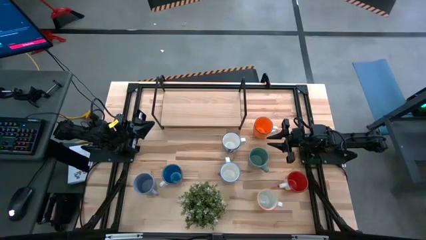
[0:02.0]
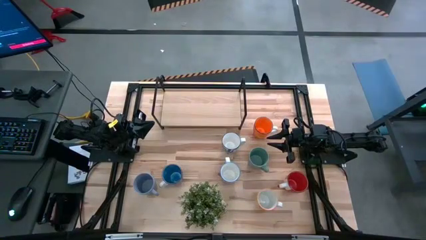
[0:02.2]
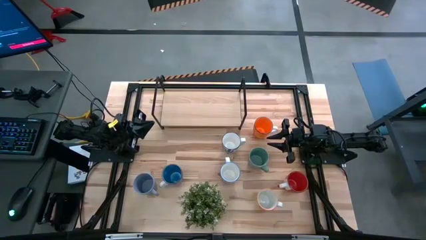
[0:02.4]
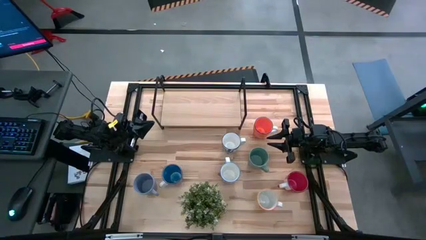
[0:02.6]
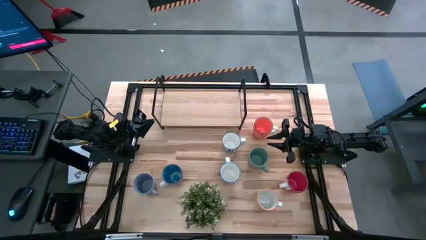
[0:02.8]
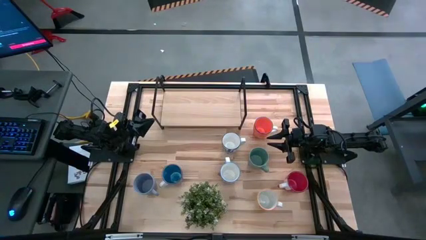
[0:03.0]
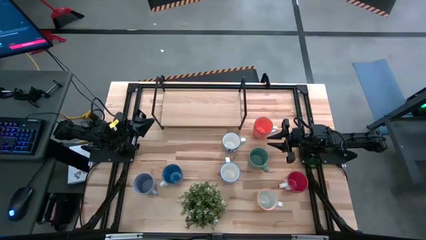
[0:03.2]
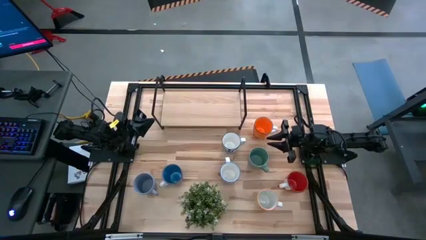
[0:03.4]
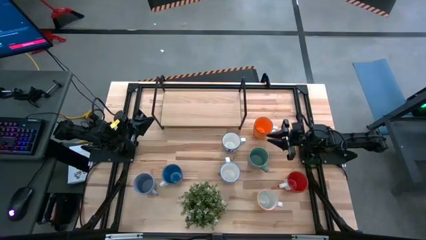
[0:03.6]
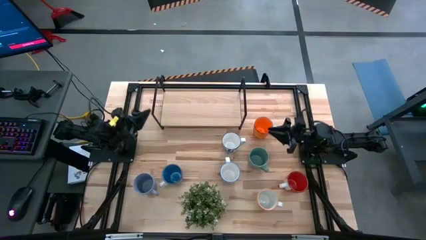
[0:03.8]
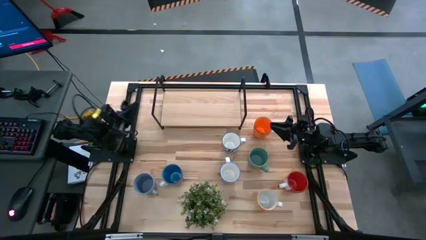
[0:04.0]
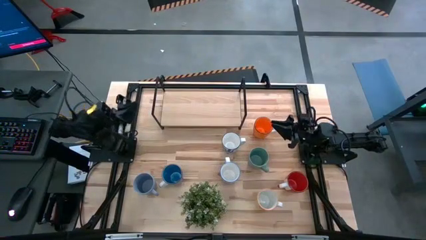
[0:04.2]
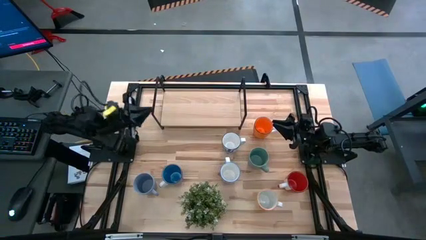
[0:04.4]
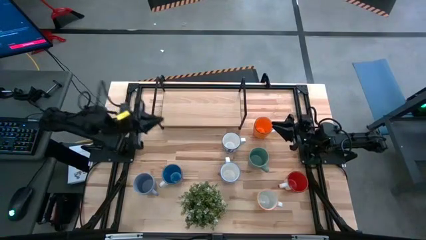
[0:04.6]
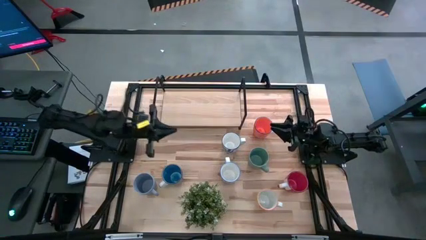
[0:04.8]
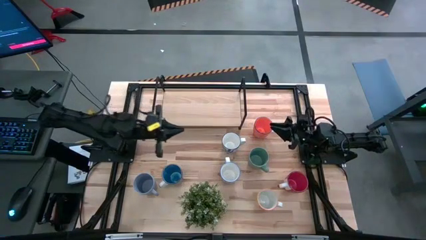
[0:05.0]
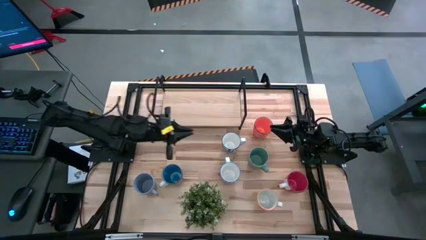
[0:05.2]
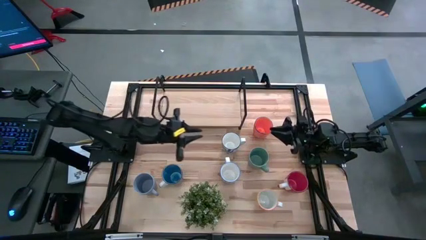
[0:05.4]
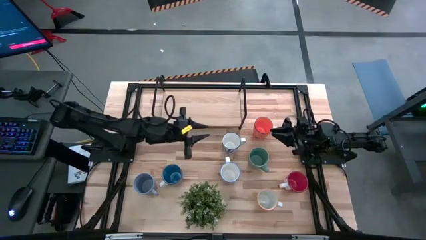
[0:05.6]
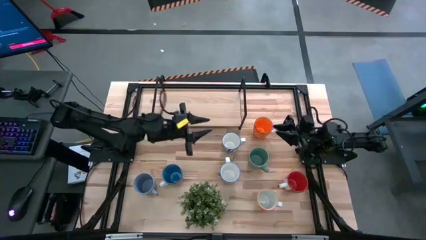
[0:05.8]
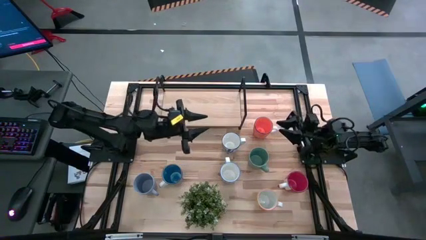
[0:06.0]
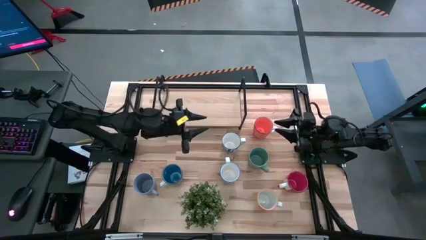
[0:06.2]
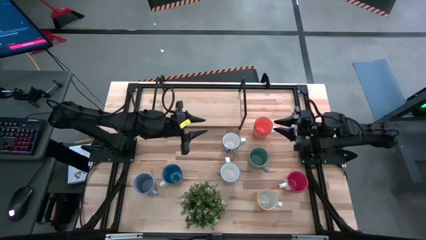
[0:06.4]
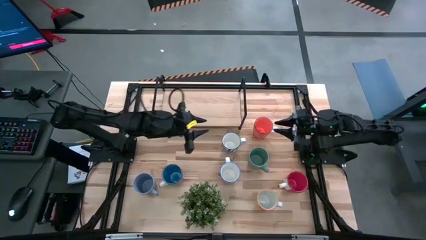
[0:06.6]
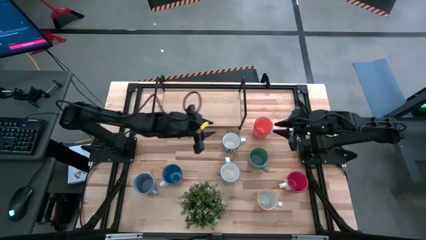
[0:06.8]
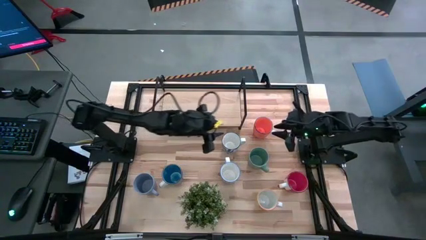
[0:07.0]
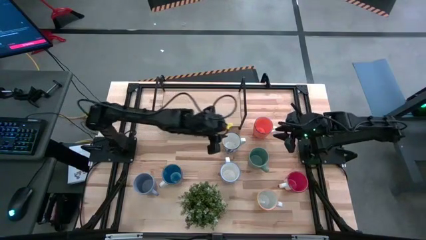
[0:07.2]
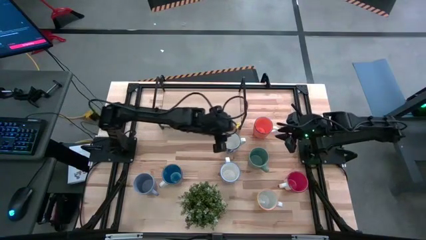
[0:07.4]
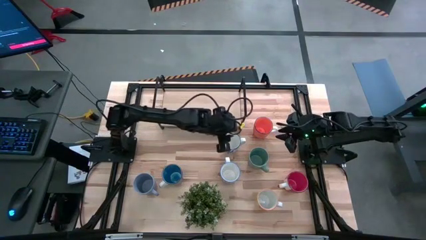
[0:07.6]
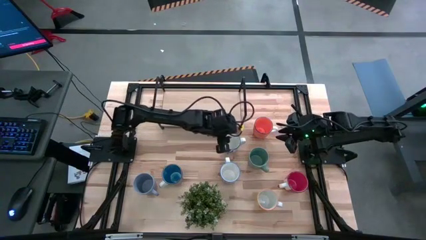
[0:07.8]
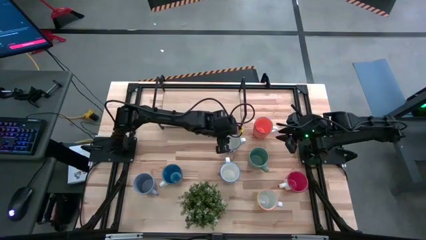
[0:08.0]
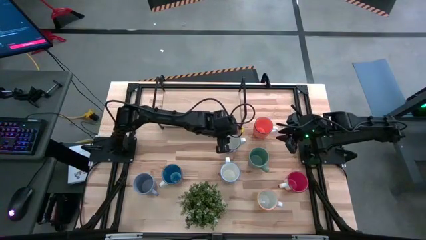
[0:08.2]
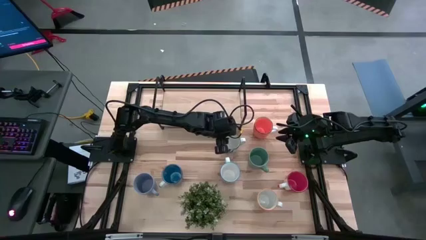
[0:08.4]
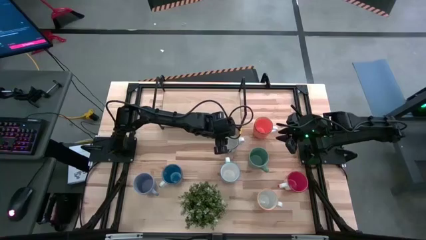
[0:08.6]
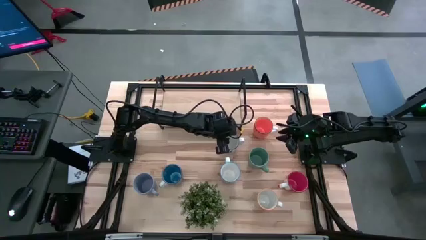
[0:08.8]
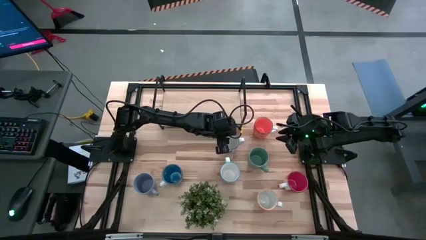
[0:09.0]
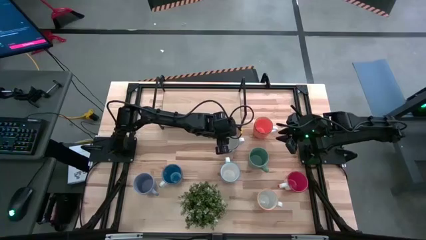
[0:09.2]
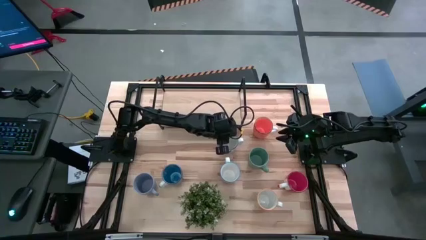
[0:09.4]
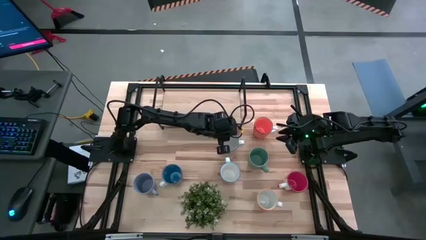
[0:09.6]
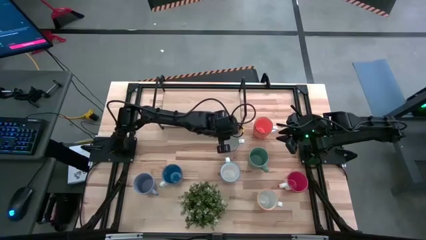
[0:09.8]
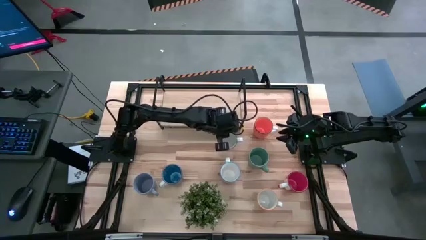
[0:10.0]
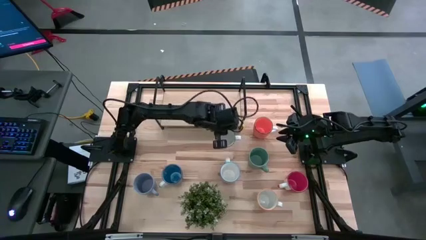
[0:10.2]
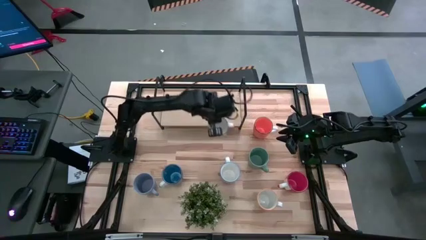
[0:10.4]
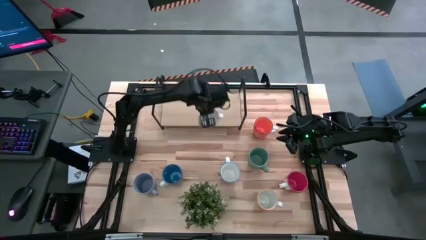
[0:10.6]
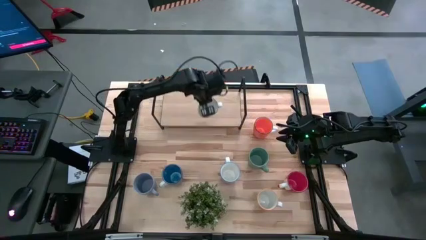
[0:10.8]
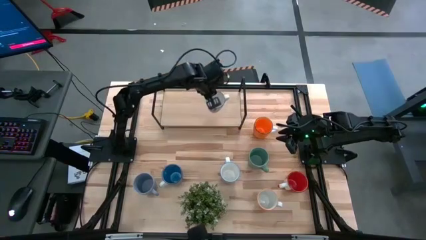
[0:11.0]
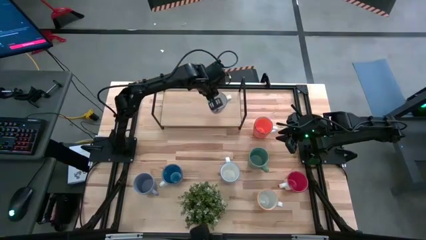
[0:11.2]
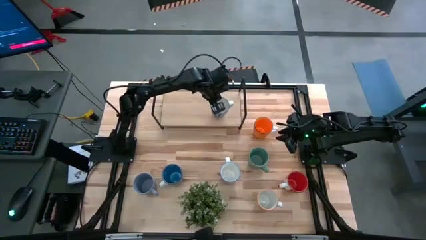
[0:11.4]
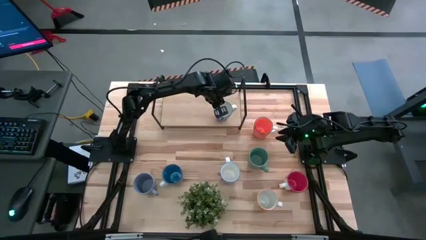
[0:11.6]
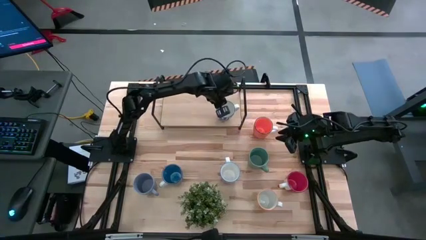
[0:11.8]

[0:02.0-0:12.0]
Task: Place coffee mugs
Put the white blue patterned mug on the shelf

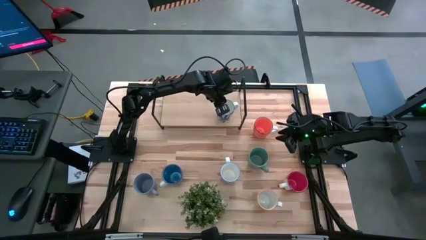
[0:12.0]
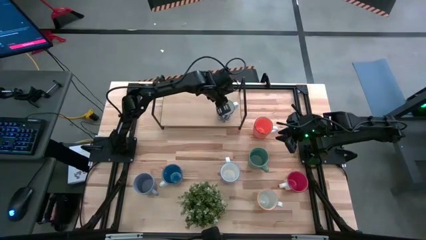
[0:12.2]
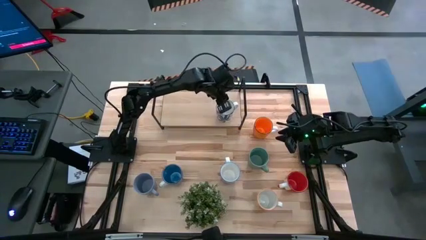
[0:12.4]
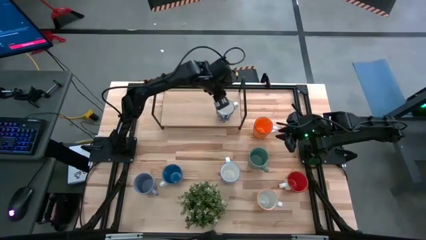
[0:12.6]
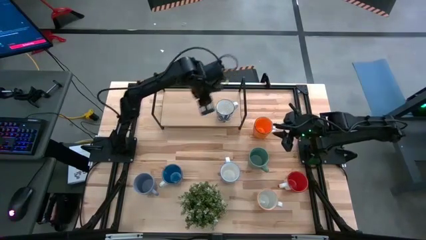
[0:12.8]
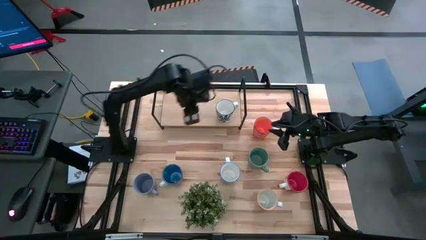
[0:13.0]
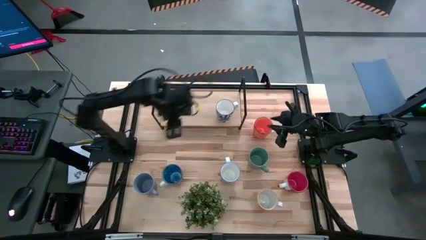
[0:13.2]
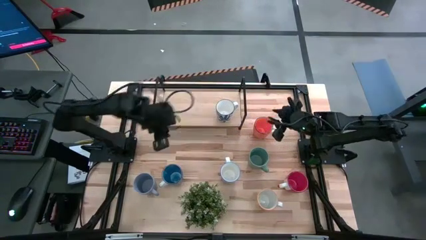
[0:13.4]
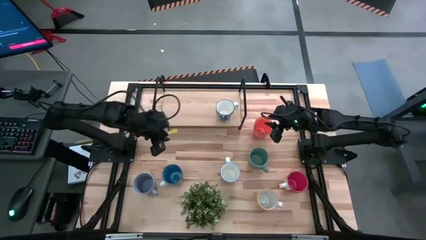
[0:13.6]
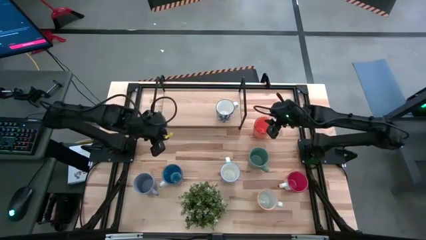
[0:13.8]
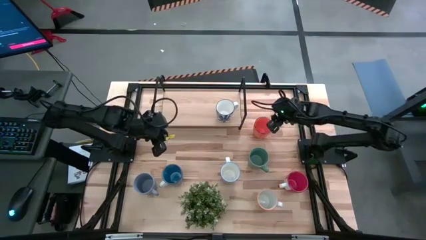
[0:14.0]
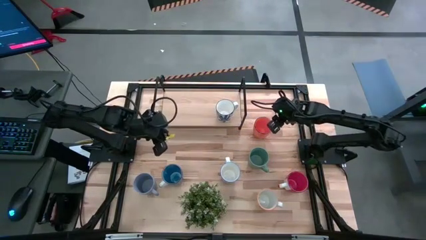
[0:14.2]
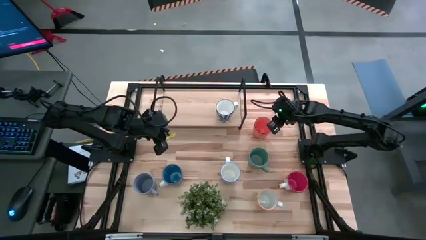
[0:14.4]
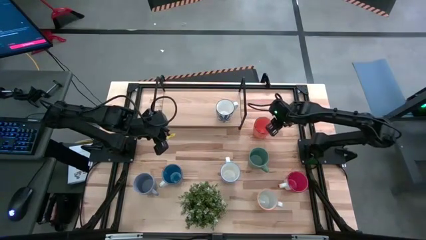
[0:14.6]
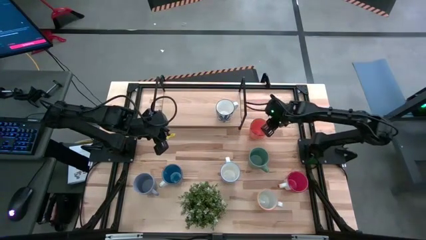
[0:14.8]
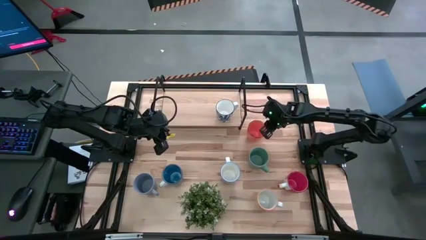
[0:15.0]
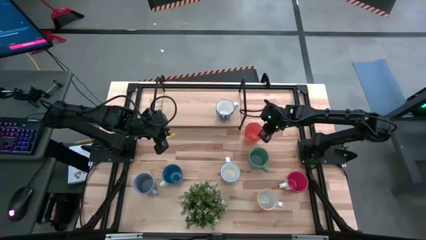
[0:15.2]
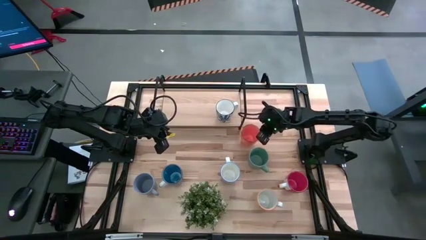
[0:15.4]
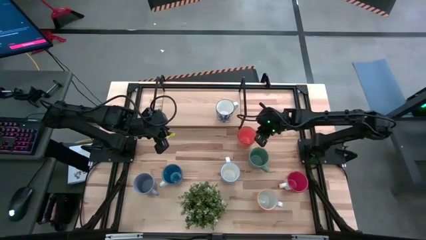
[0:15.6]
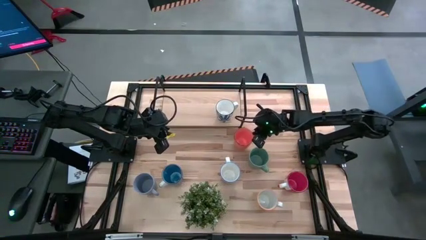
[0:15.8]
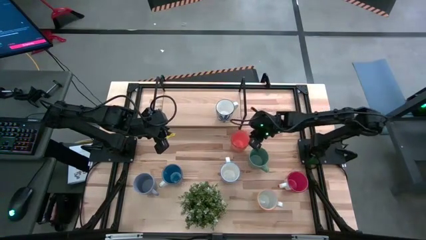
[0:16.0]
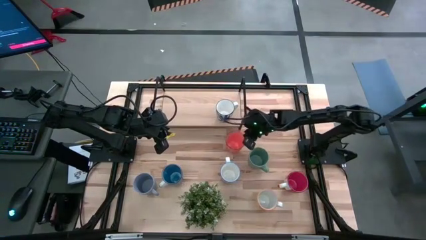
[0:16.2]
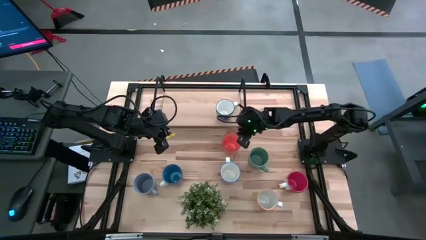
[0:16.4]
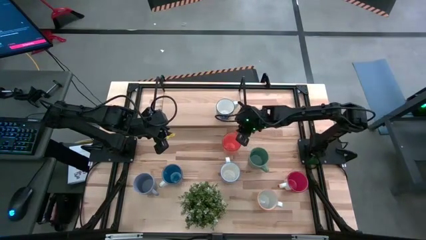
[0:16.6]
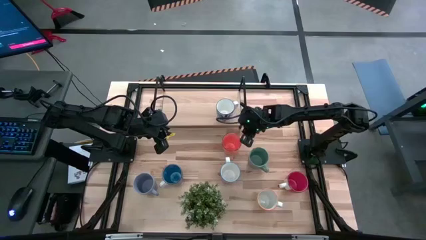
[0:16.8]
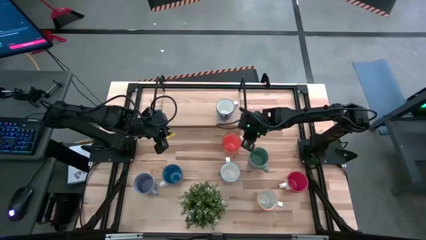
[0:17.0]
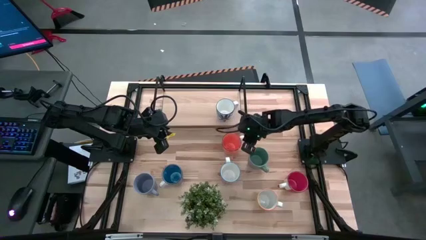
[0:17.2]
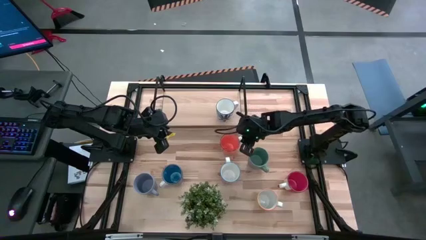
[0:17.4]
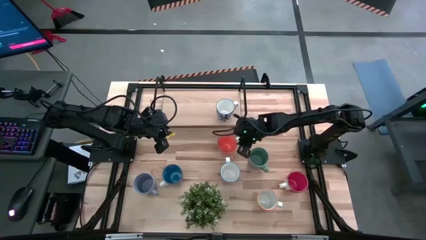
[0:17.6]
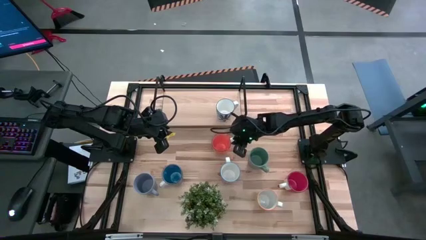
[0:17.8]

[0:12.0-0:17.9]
Move the orange mug to the center of the table
